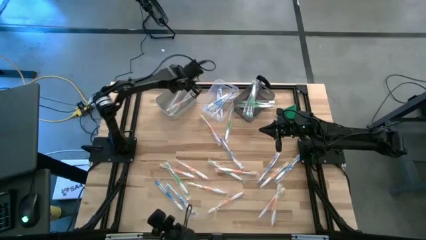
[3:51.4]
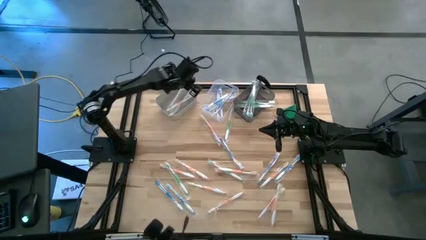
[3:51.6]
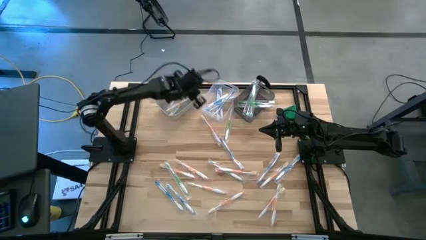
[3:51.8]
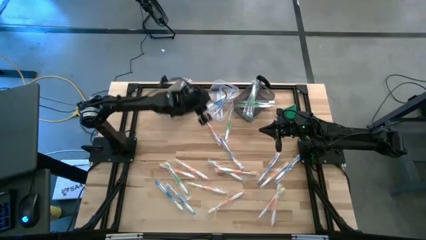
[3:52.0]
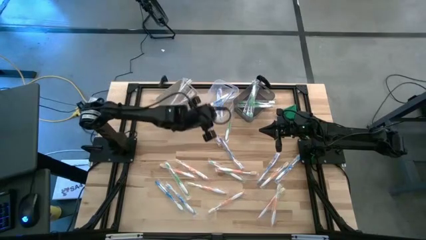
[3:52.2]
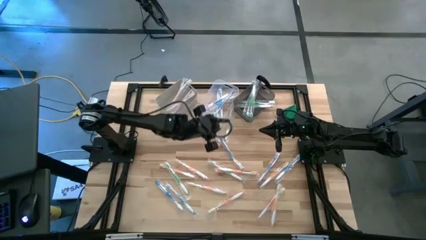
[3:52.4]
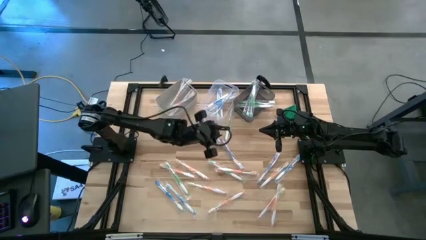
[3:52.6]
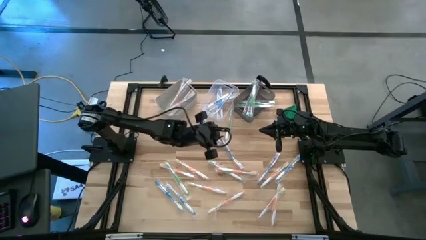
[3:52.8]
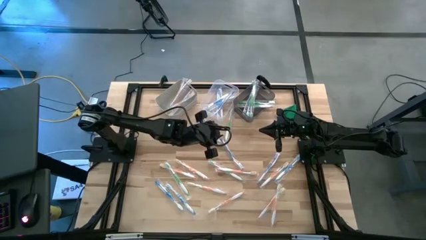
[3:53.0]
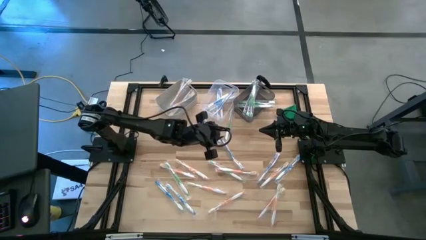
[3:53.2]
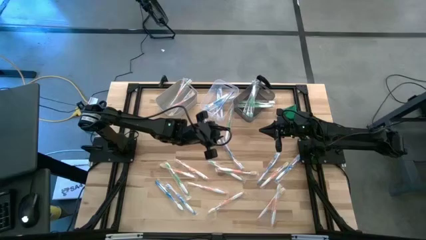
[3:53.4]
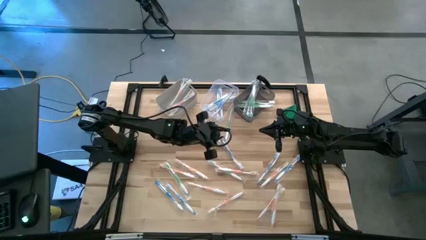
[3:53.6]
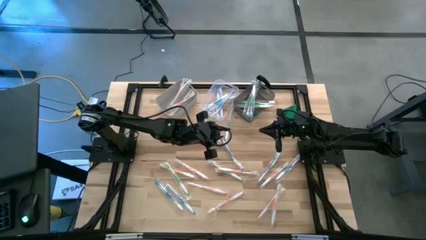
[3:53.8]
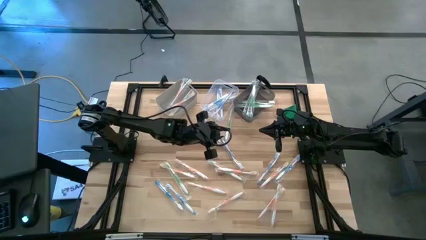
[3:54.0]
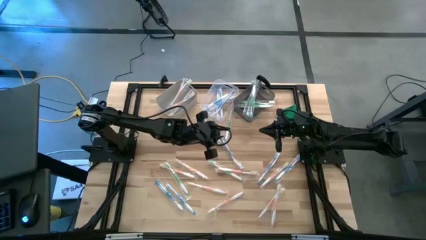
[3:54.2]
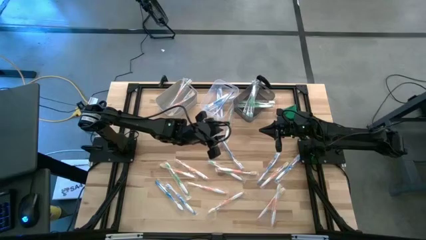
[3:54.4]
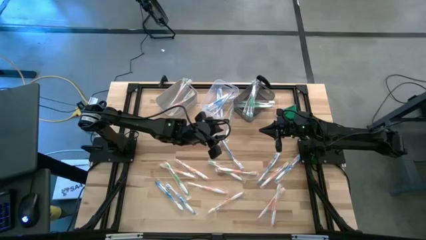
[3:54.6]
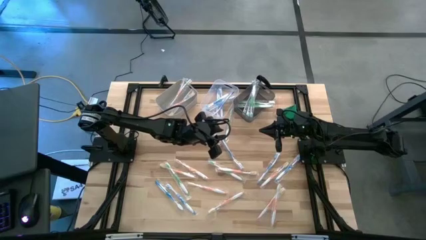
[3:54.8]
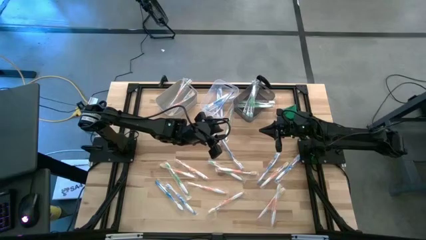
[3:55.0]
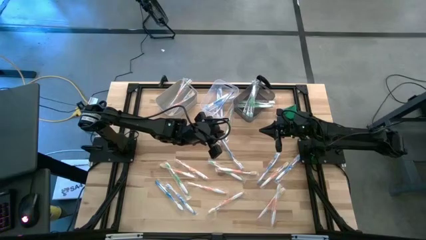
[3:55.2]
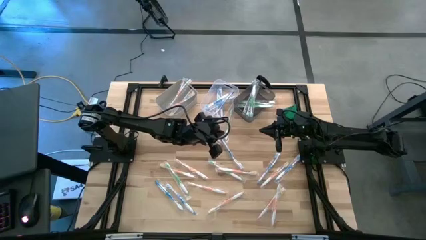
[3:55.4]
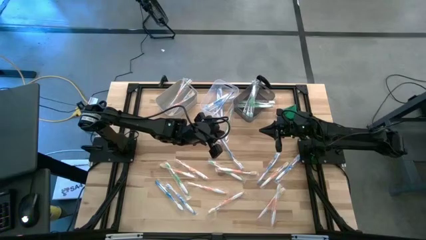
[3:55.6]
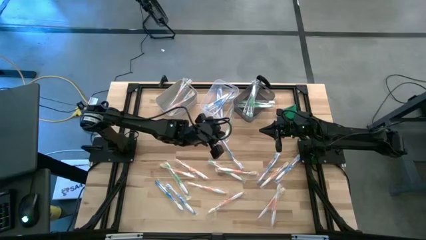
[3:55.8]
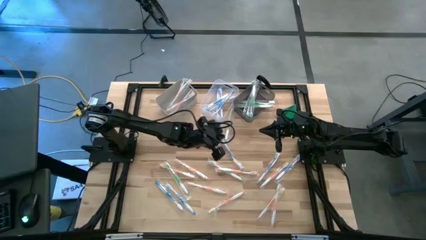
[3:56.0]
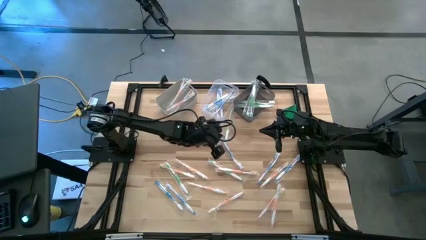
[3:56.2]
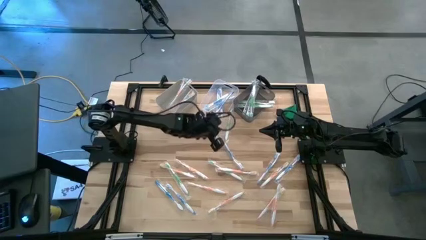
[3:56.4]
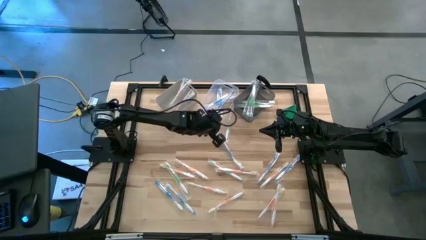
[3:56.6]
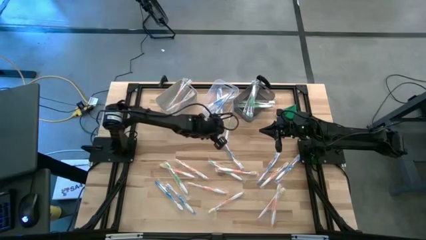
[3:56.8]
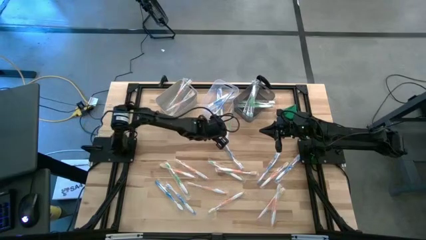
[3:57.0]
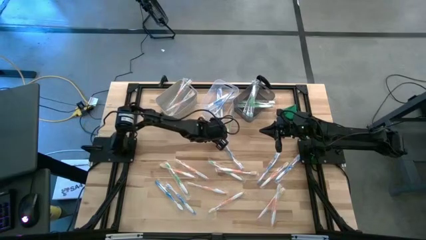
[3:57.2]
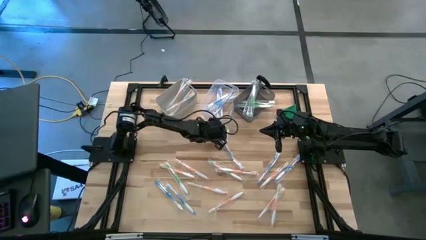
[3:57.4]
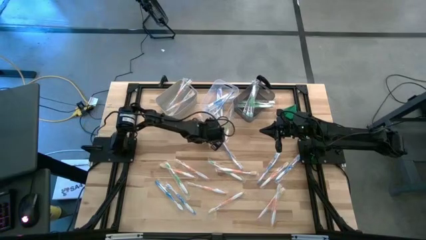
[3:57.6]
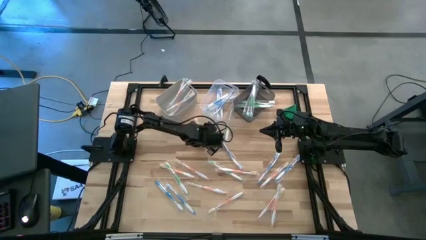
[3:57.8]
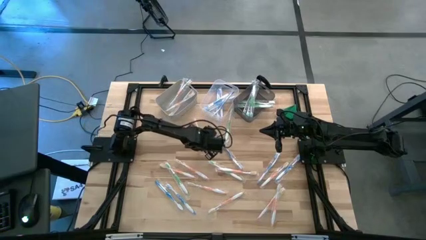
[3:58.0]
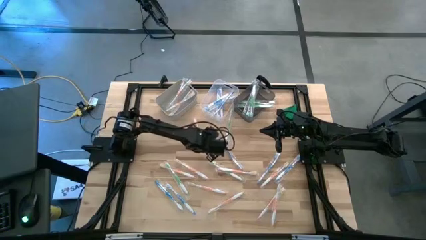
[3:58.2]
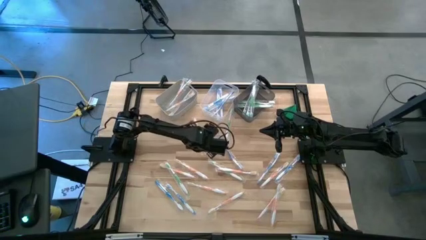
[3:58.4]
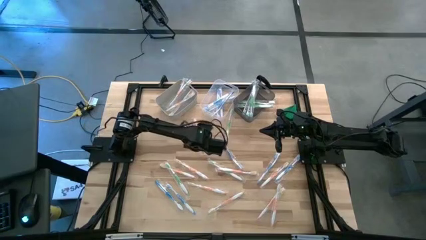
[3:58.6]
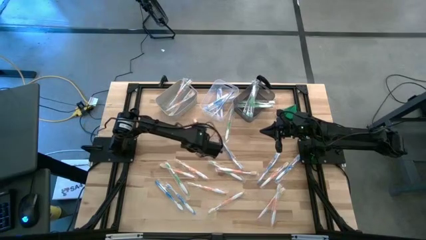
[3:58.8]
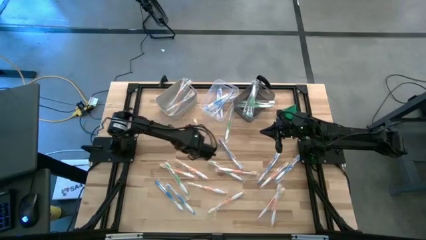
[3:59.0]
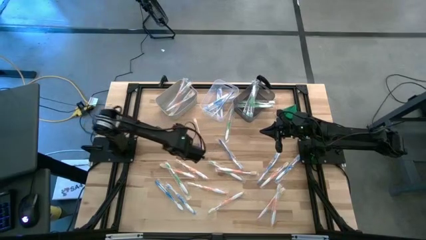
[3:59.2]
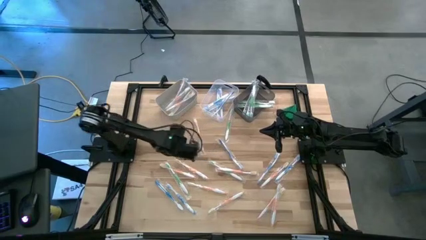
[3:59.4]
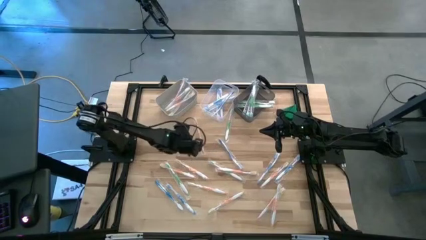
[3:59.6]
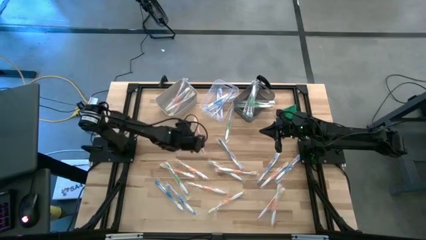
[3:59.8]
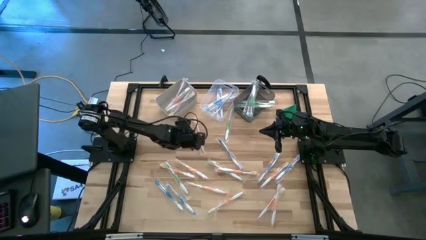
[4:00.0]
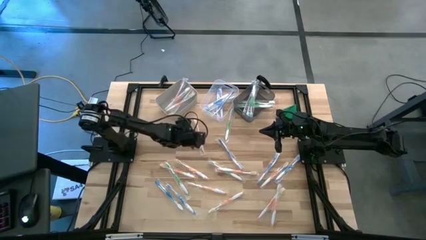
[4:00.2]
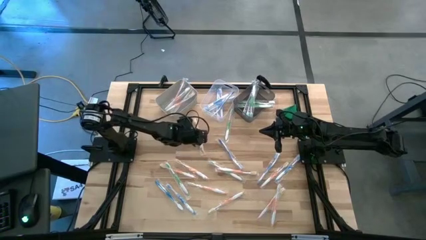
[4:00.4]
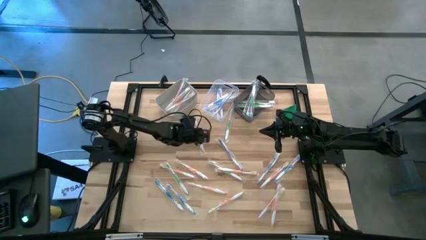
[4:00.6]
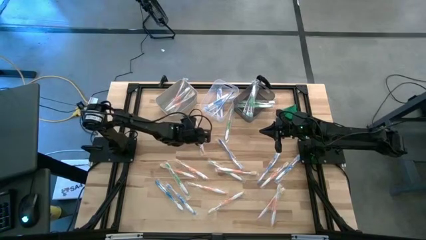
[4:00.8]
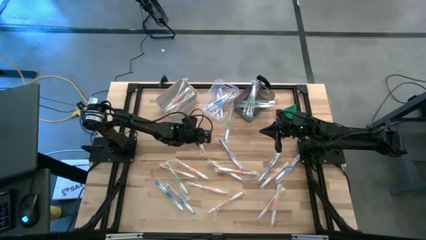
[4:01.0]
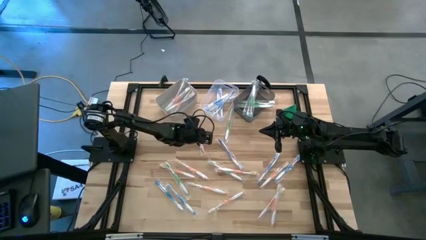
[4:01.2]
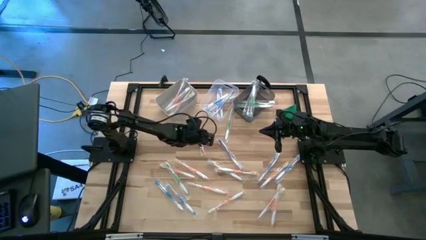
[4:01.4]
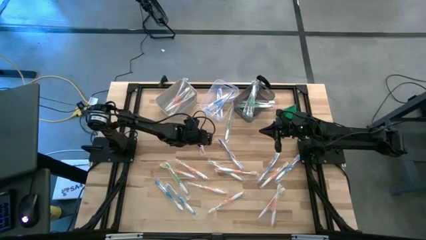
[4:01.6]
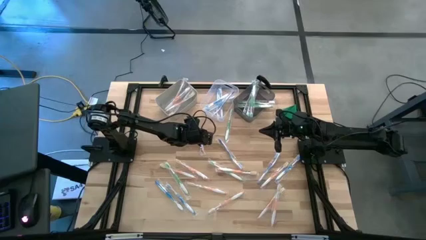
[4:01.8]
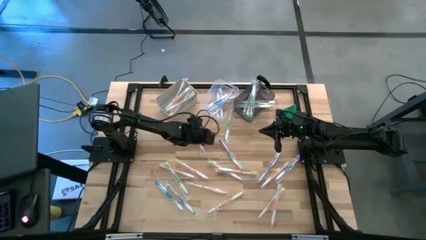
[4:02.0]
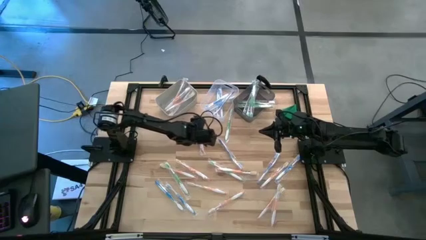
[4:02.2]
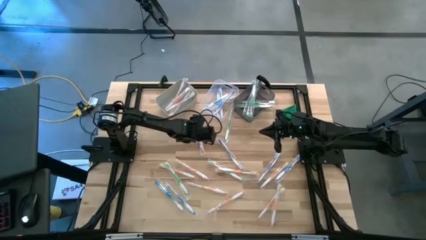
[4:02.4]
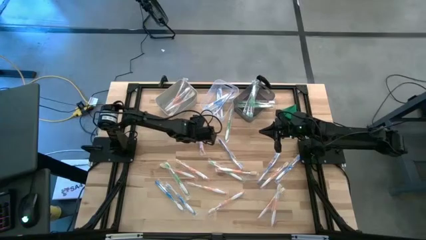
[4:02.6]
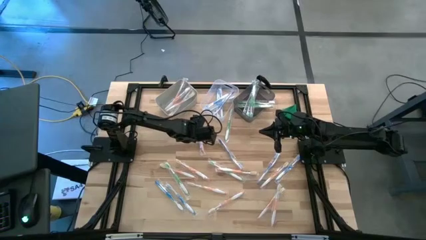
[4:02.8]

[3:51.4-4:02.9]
Task: Pick & Place Toothbrushes
Put the orange toothbrush into the white bin

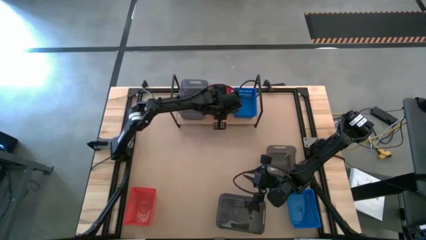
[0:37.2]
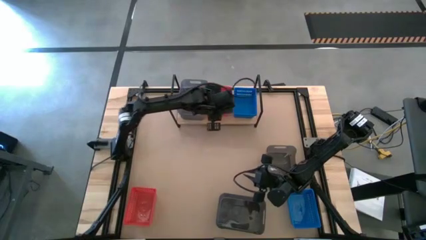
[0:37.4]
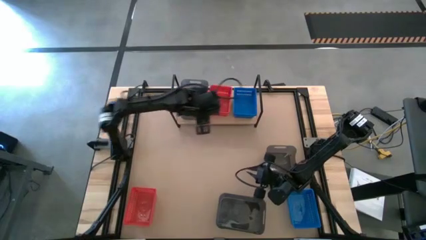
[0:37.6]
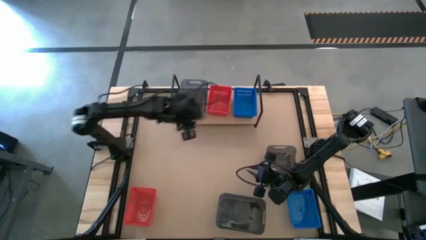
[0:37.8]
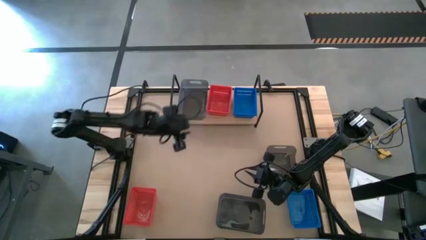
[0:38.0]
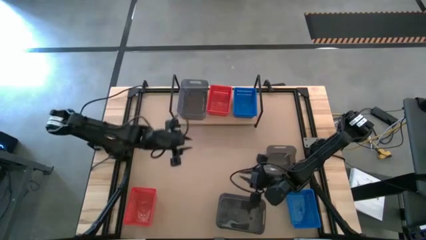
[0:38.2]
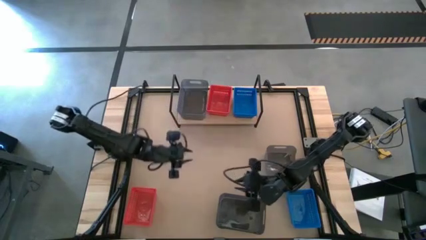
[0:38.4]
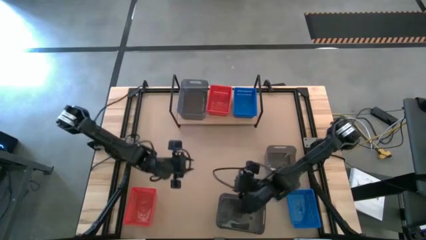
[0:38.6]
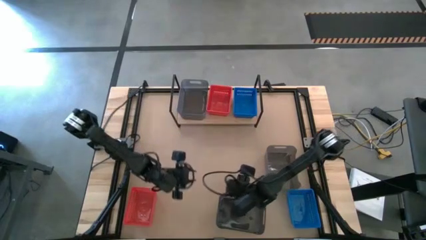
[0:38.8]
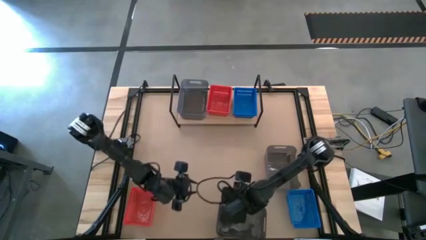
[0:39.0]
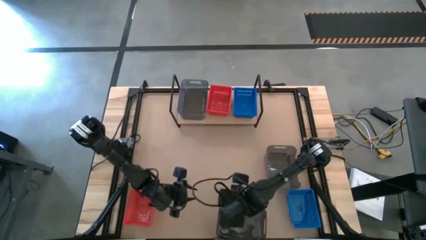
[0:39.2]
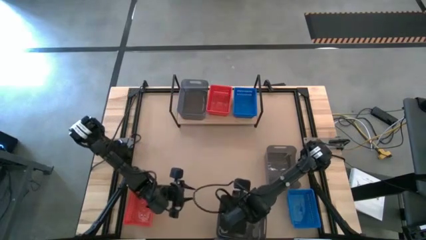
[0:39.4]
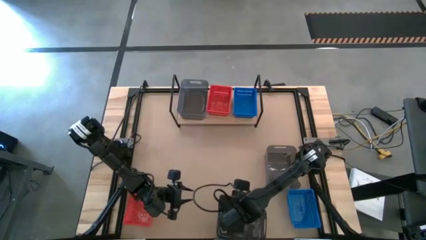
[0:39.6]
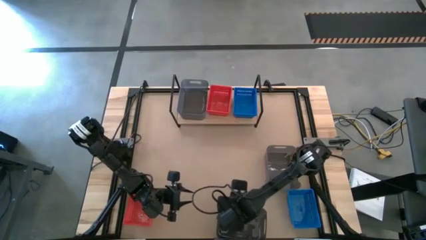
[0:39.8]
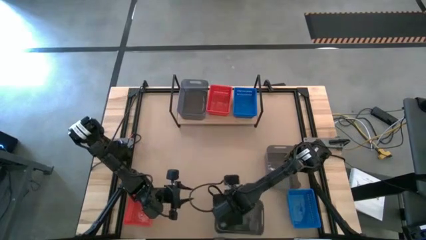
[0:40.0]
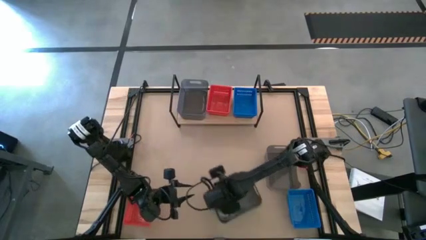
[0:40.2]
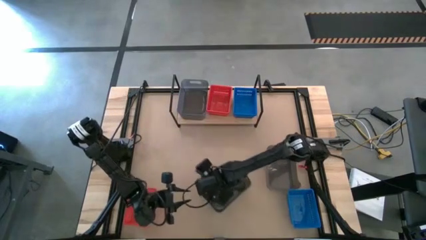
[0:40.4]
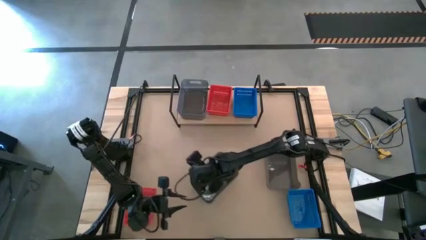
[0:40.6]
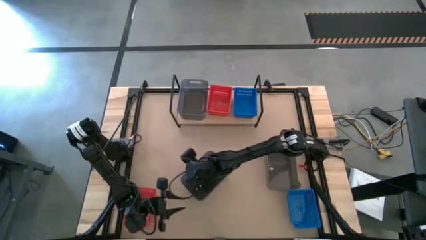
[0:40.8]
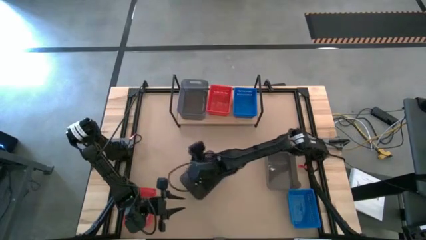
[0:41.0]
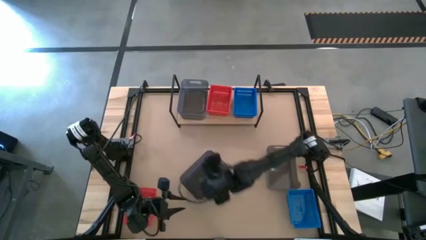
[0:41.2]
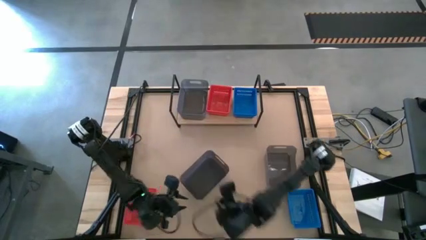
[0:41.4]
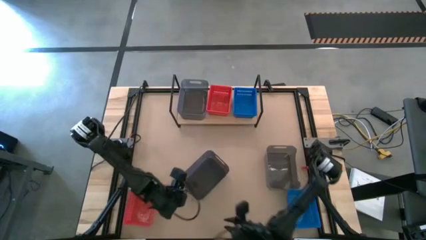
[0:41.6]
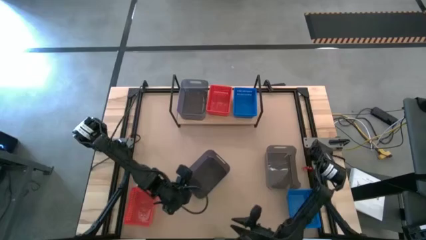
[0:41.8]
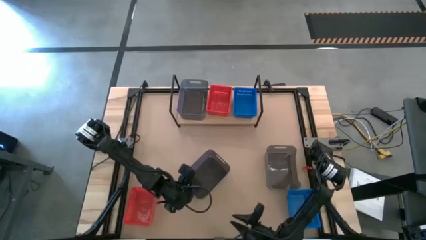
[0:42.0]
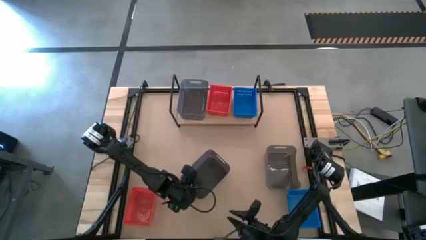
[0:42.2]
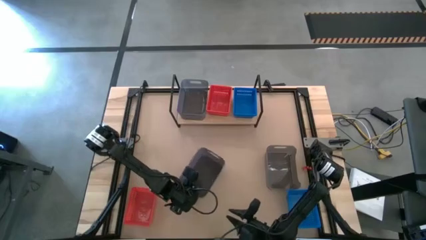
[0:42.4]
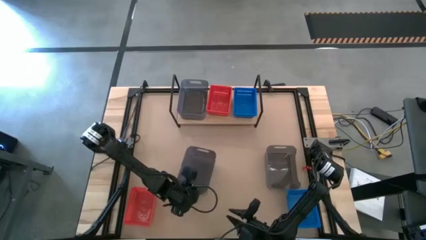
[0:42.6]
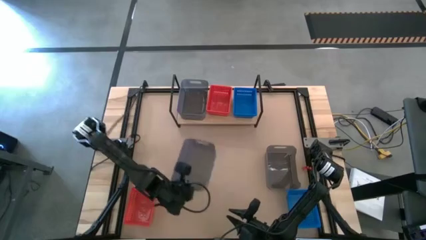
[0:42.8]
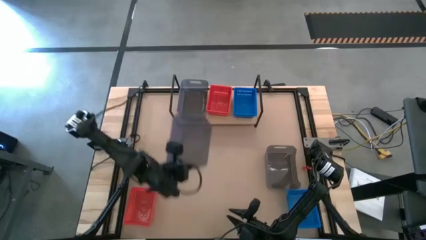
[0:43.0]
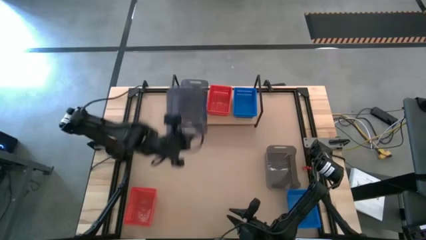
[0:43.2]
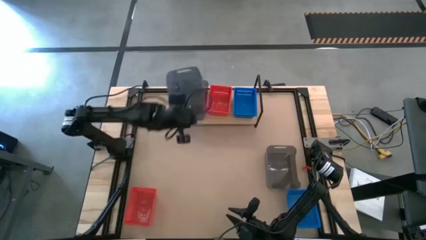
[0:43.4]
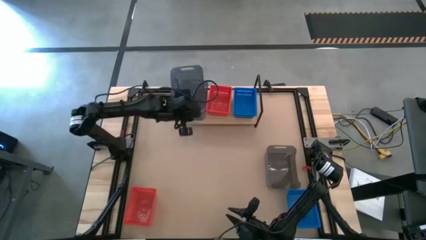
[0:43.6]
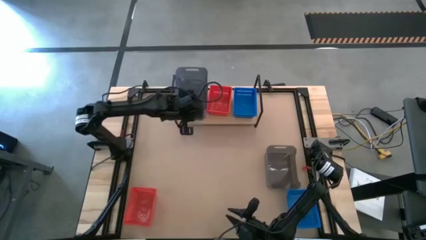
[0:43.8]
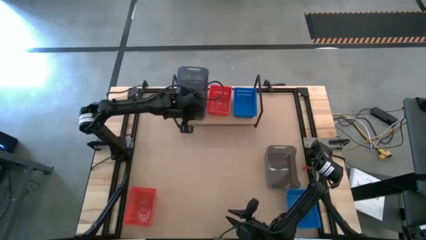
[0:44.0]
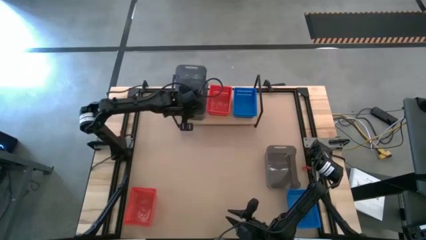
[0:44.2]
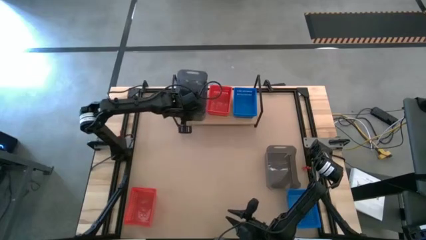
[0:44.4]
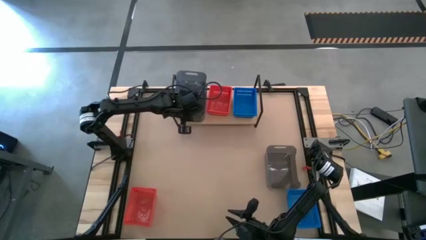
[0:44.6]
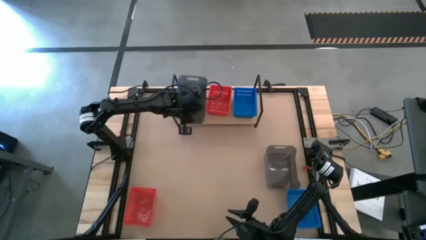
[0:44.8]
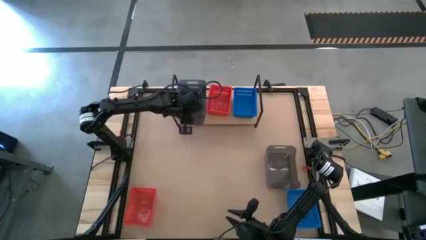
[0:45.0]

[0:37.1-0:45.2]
Task: Stack baskets on shelf by color
Stack the bottom black bin on the other black bin on the shelf
